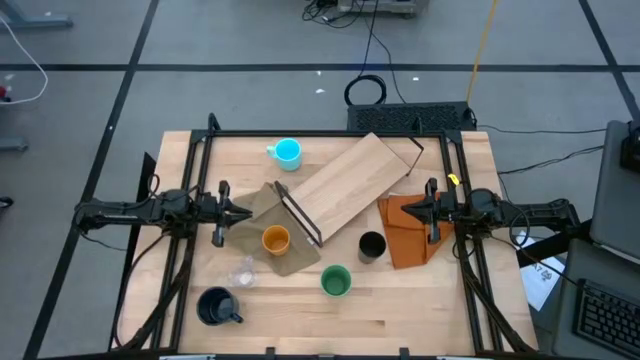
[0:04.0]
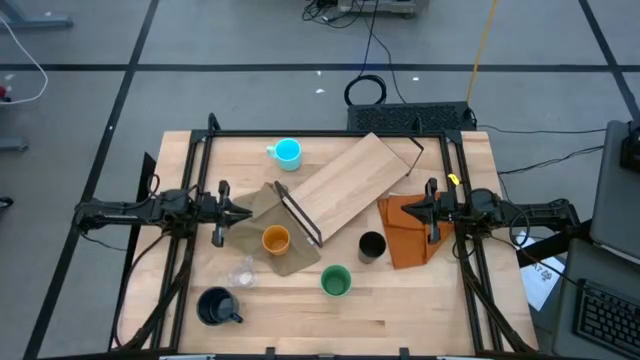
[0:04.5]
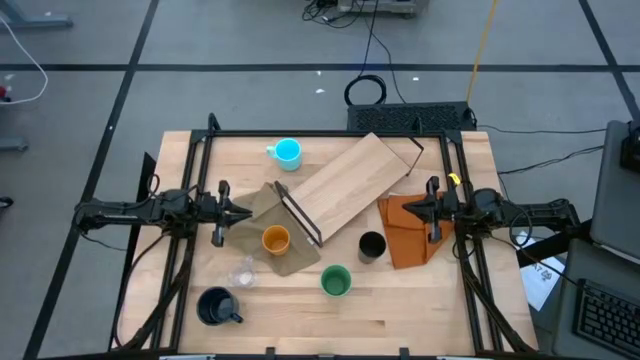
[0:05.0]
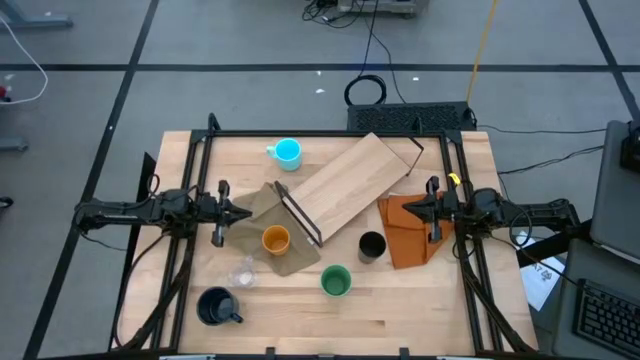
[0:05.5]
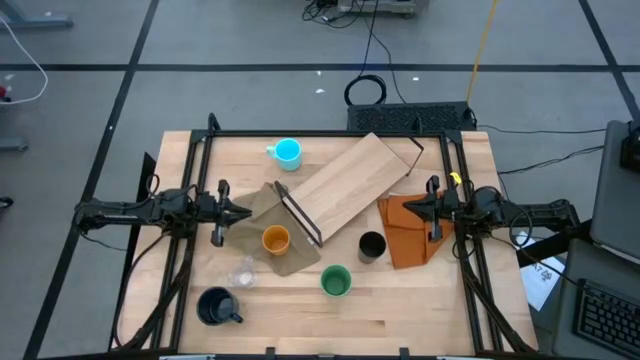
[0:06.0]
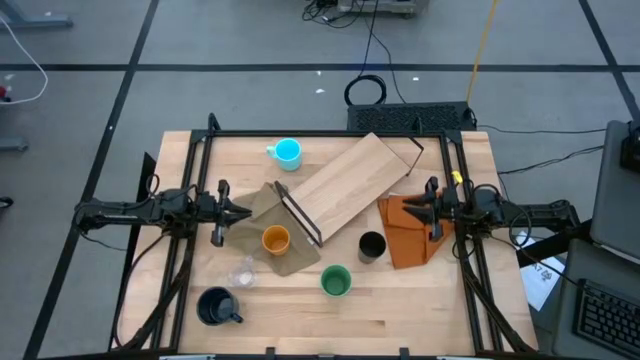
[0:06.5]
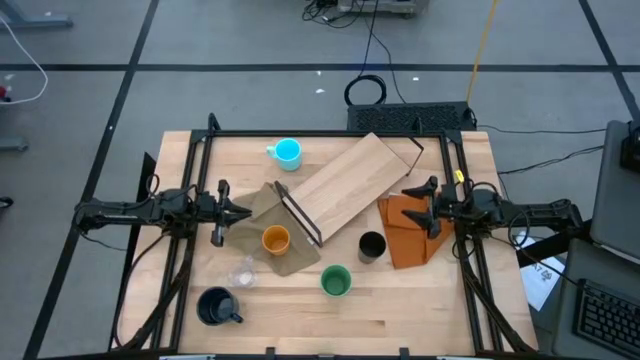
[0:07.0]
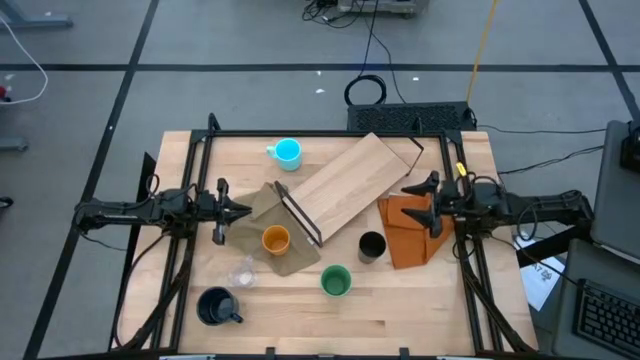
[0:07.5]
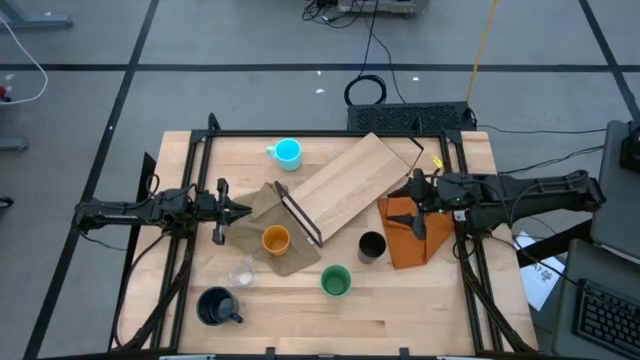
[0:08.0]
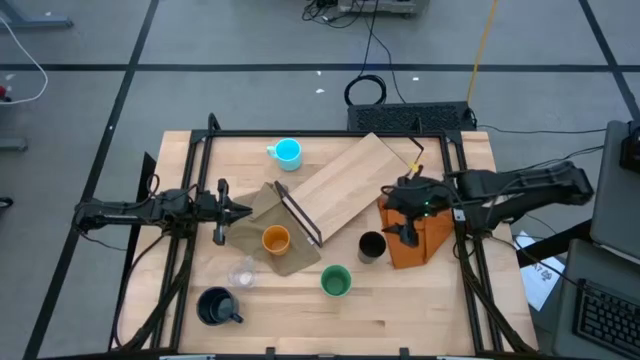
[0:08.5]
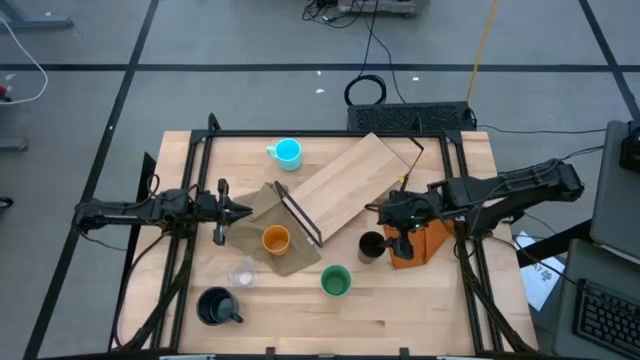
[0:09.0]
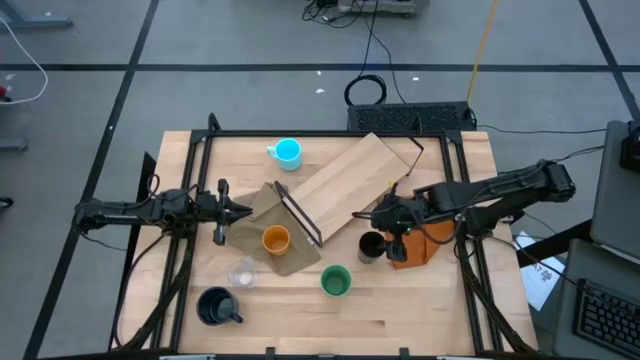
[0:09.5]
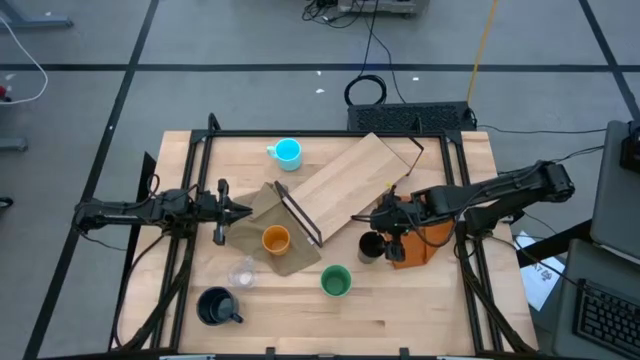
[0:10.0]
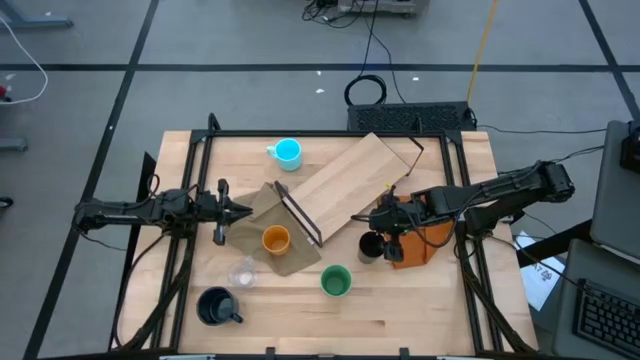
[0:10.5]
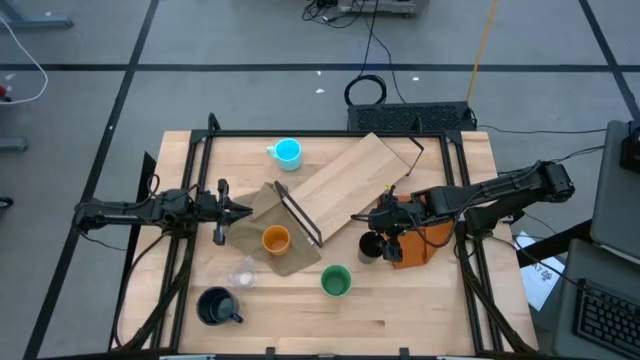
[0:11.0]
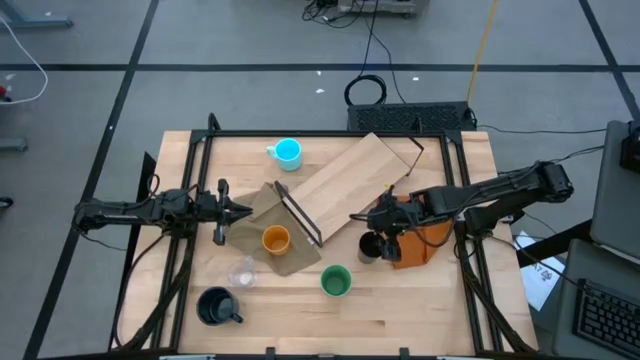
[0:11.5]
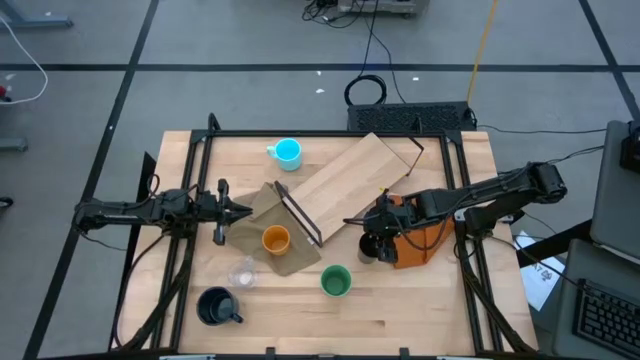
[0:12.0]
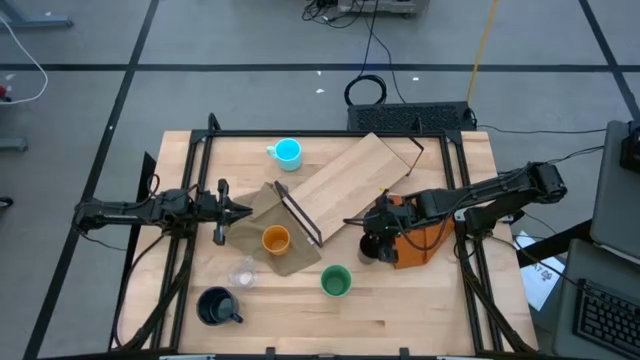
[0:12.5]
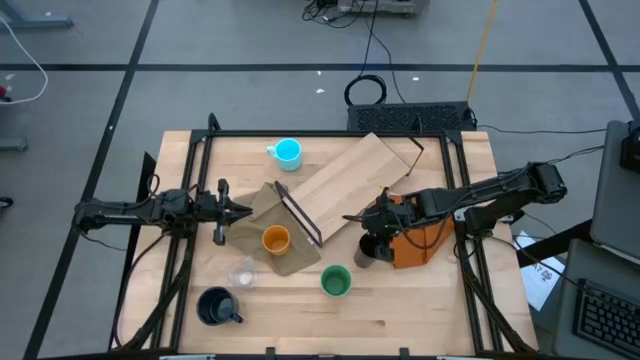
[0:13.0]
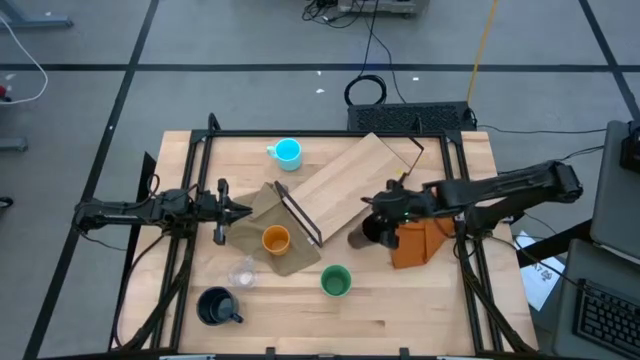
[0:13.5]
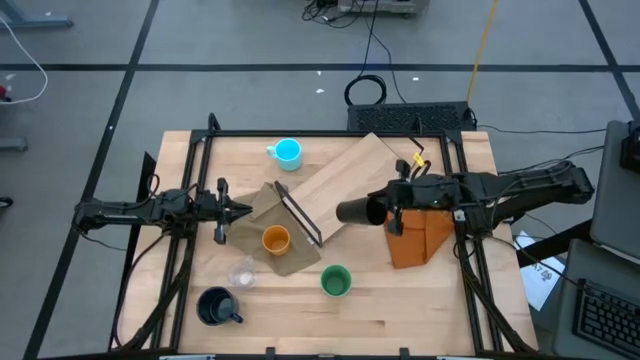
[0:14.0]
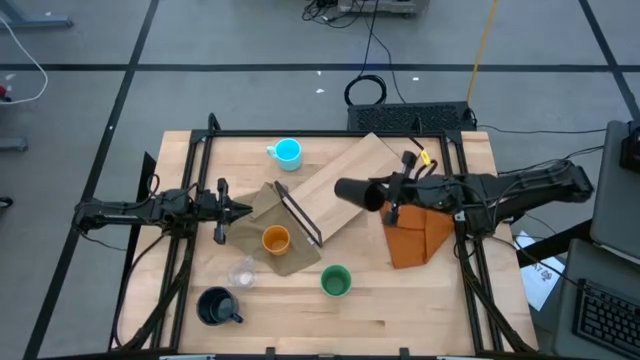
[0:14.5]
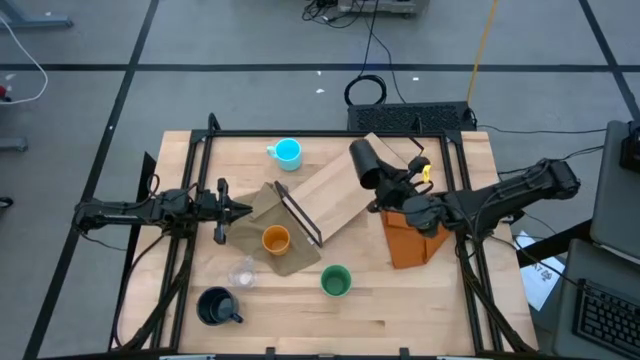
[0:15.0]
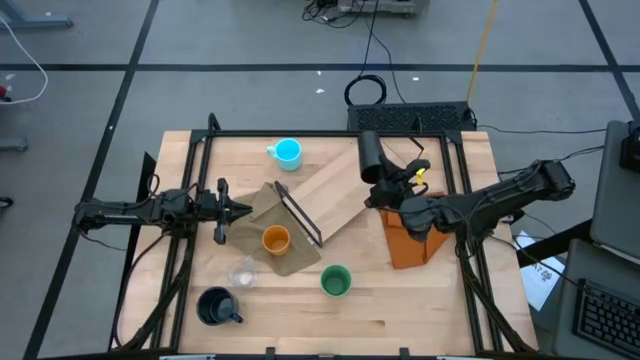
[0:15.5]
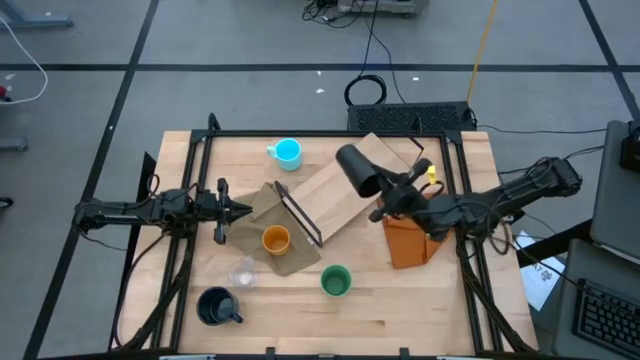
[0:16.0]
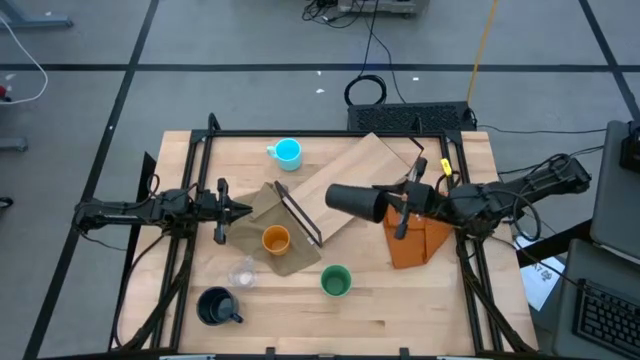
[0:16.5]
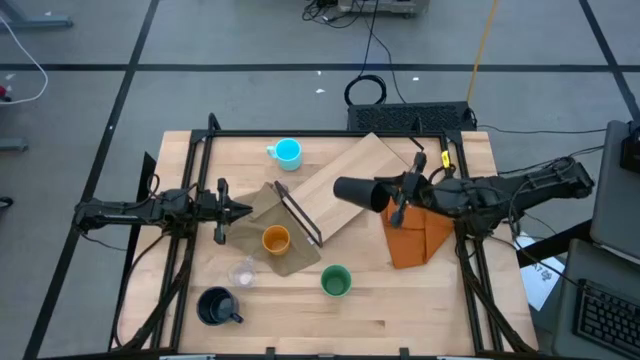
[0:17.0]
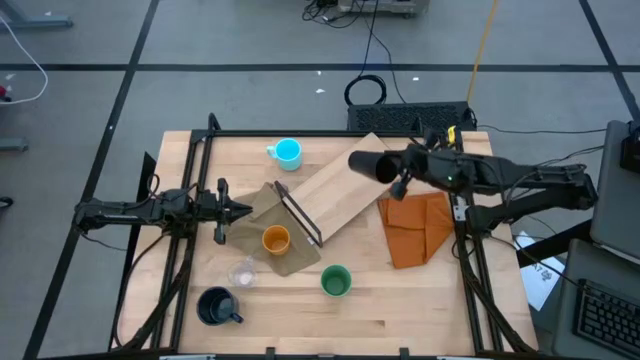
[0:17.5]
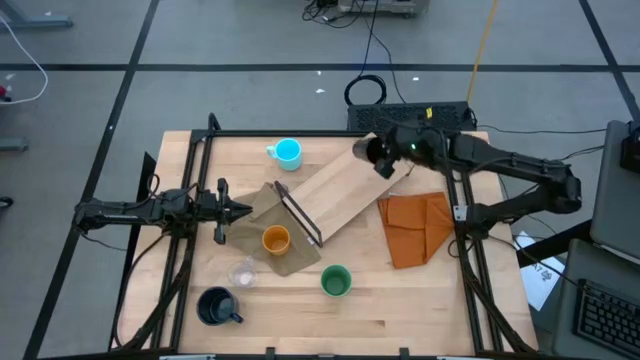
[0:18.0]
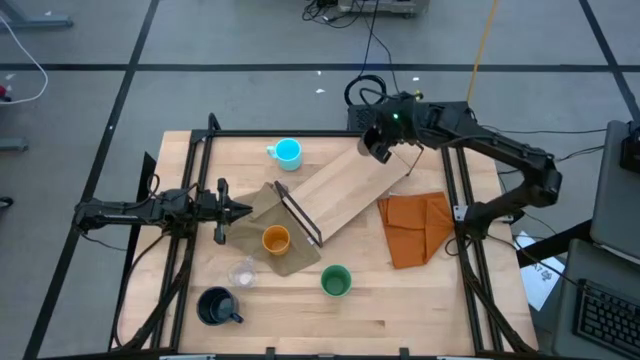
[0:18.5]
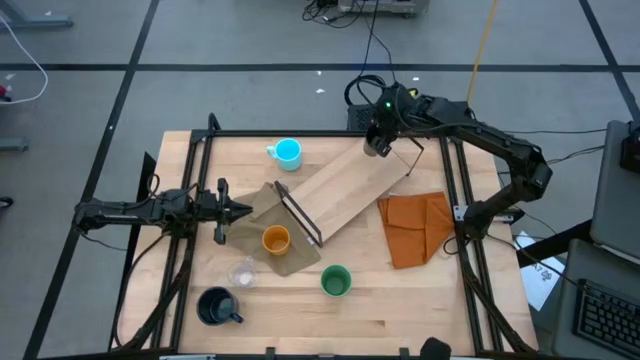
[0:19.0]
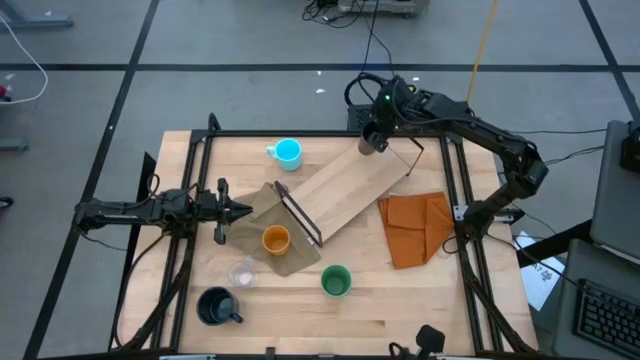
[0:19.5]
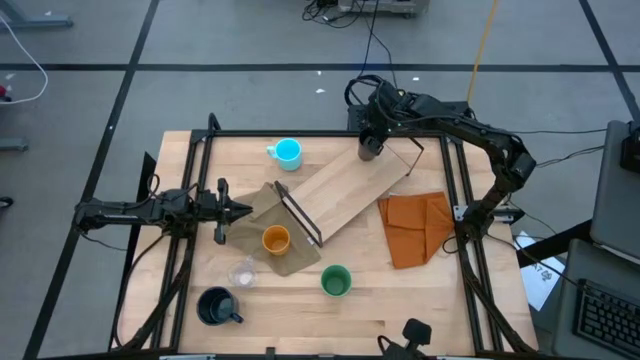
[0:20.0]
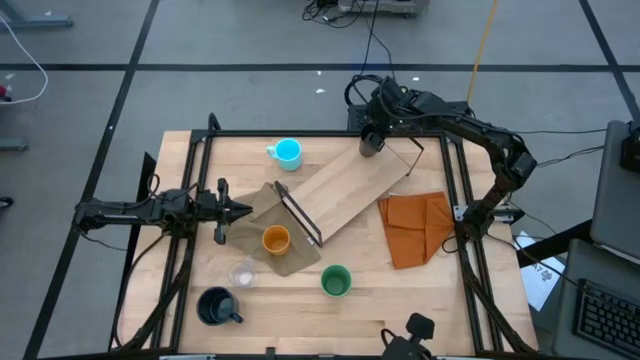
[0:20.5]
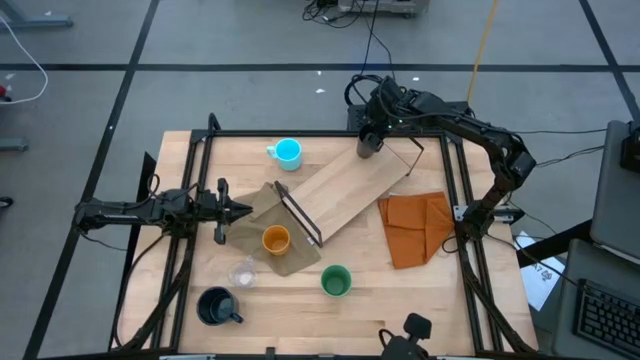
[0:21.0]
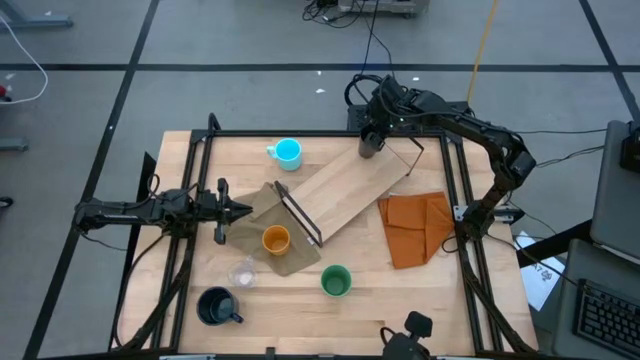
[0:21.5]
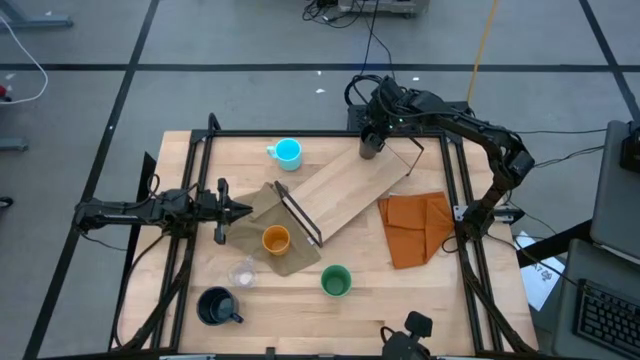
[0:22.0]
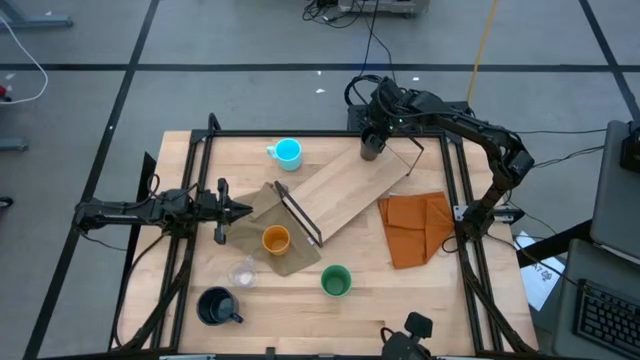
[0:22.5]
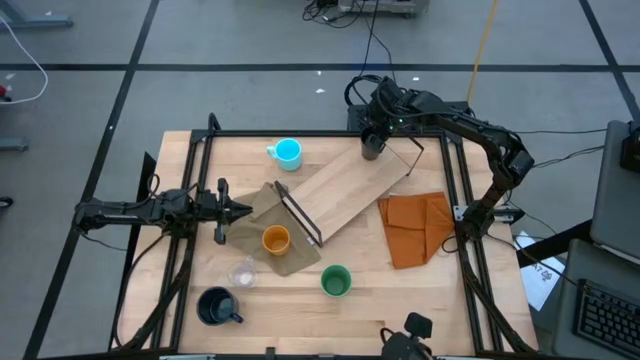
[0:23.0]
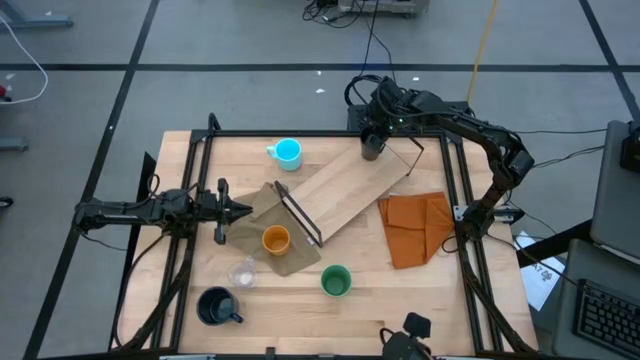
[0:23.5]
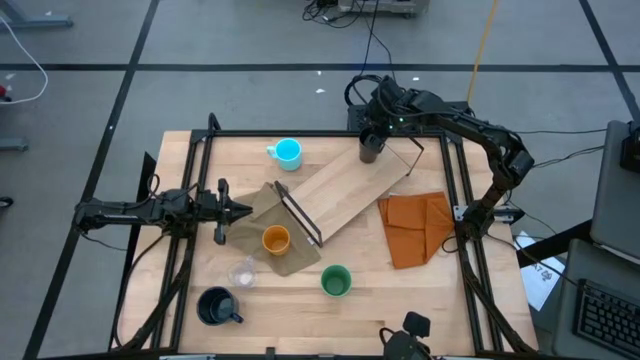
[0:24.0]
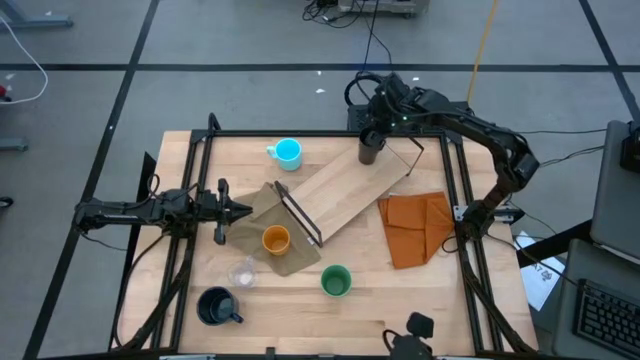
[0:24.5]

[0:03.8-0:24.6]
Task: Stack small to large cups/mugs on shelf
Put the black cup on the shelf
